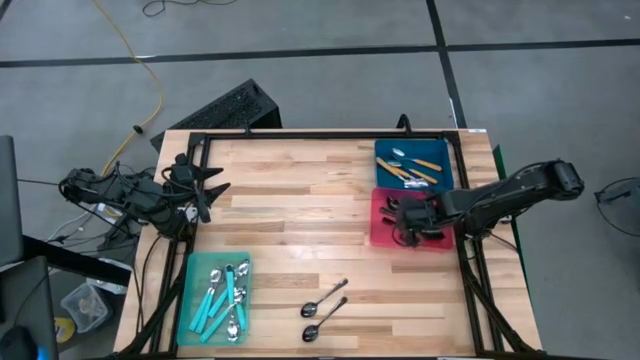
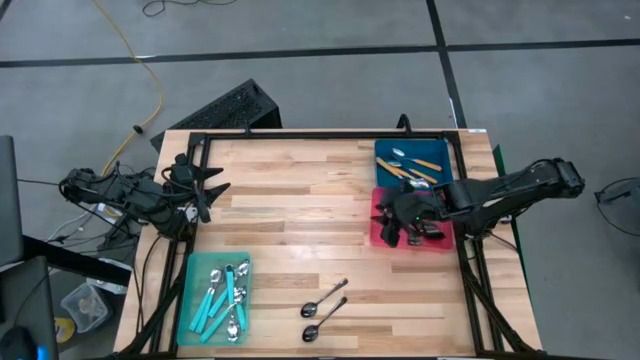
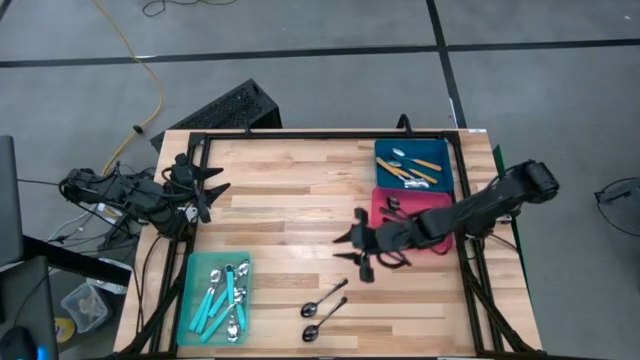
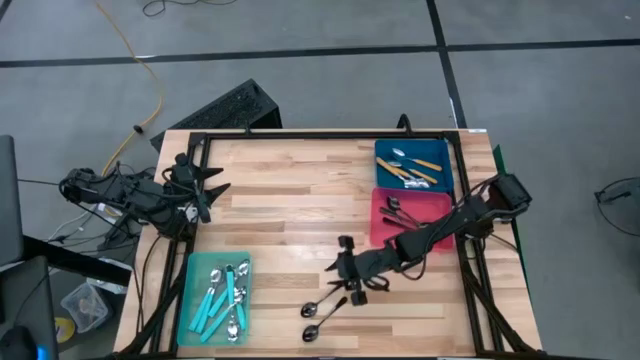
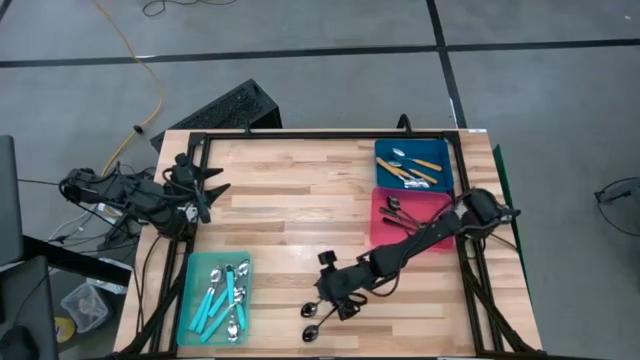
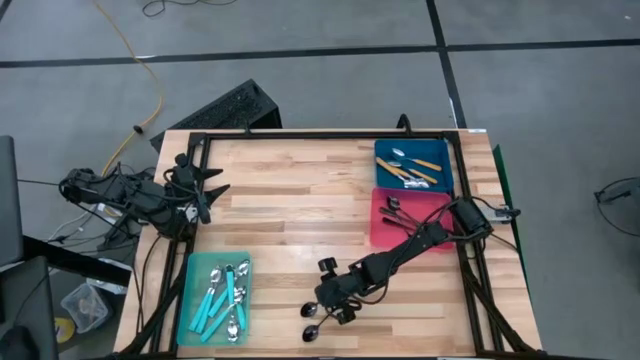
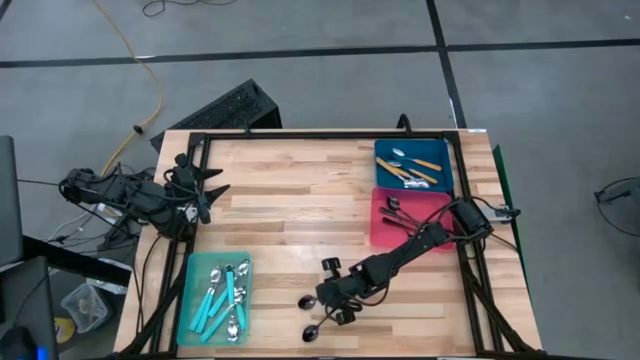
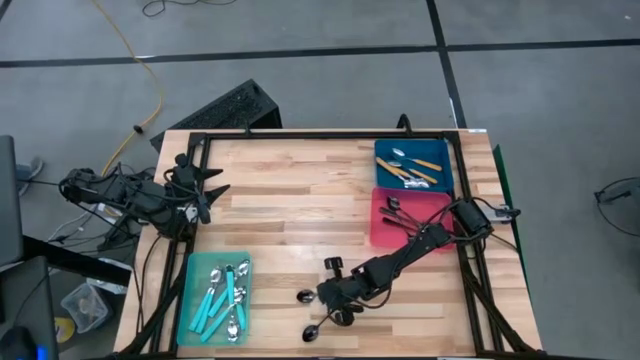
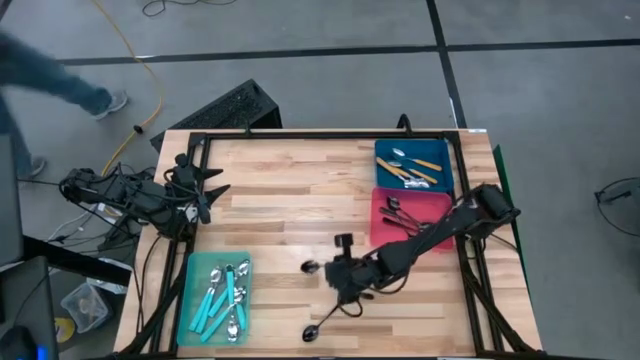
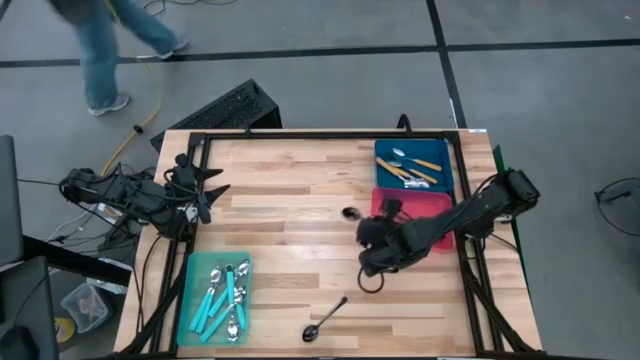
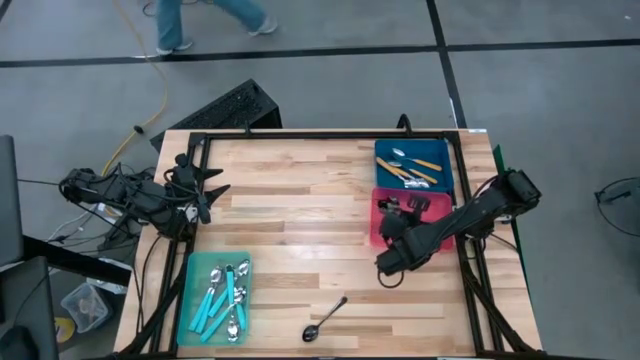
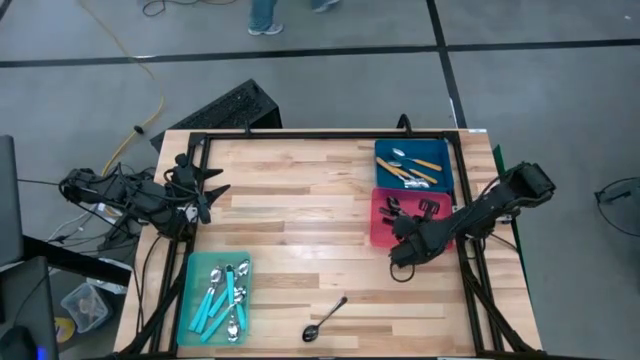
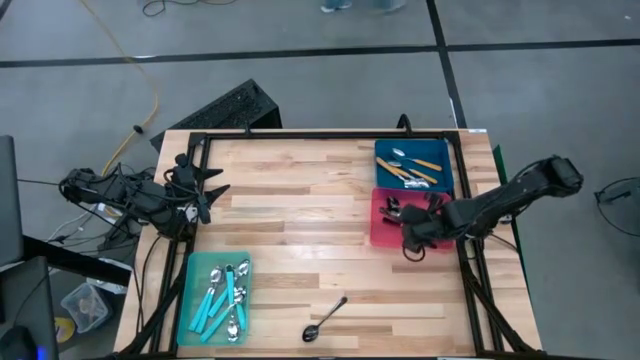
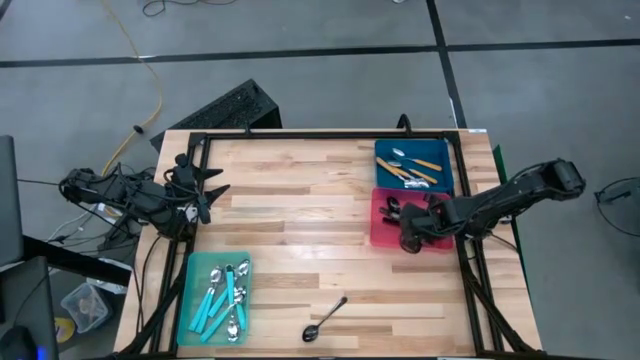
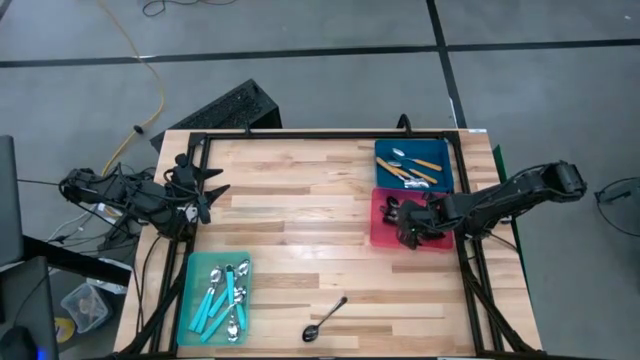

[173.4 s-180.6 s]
Task: Sort silverware by color (type)
Put the black spoon into the red bin

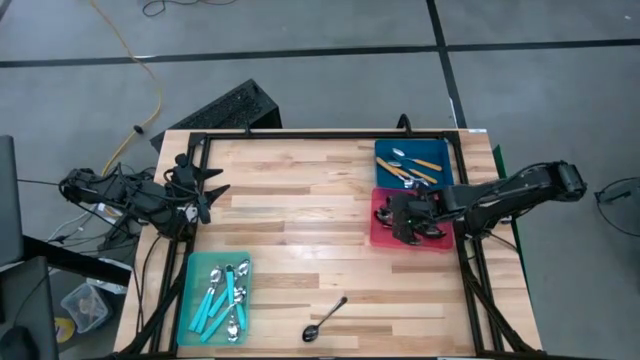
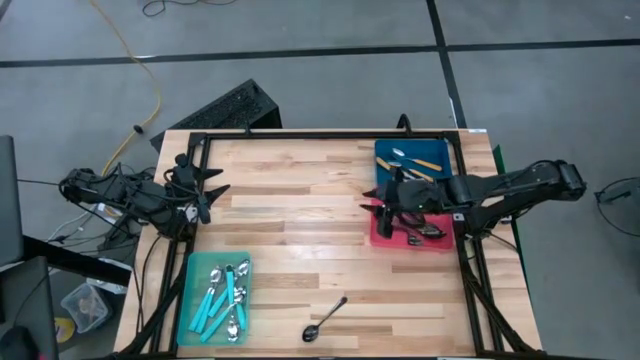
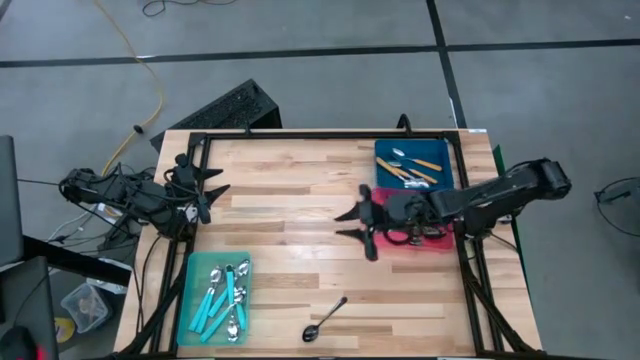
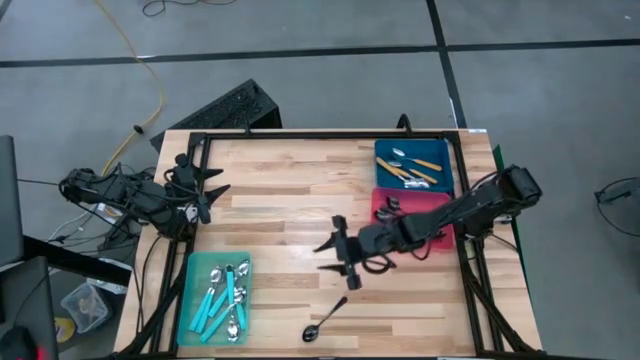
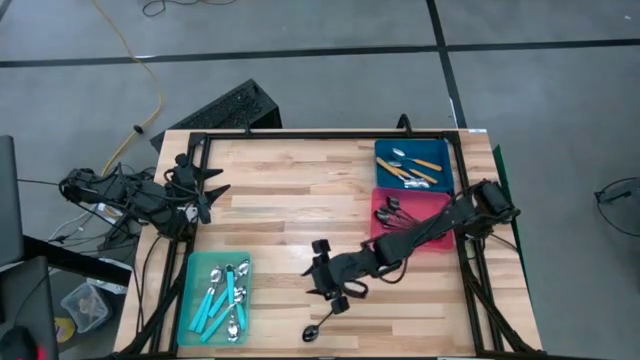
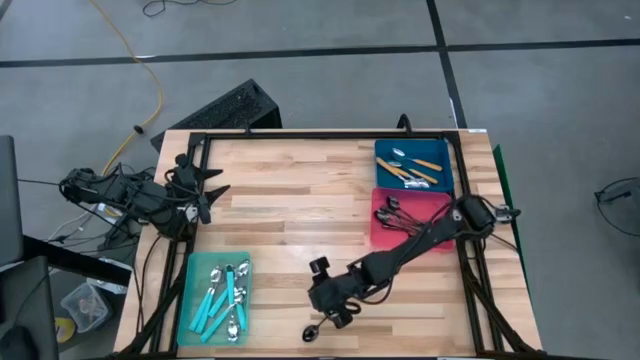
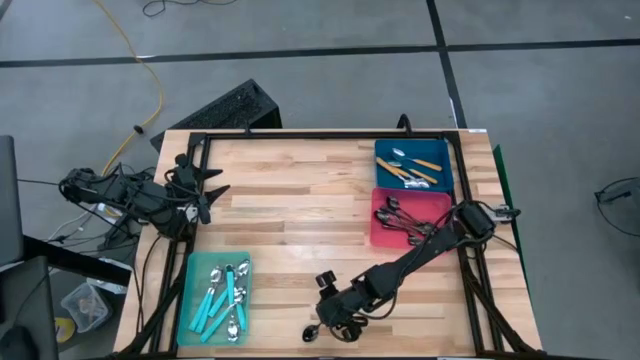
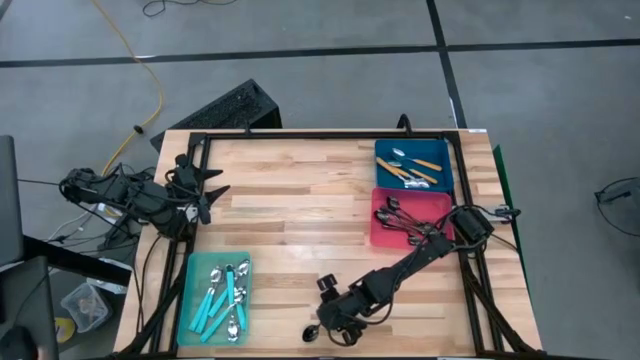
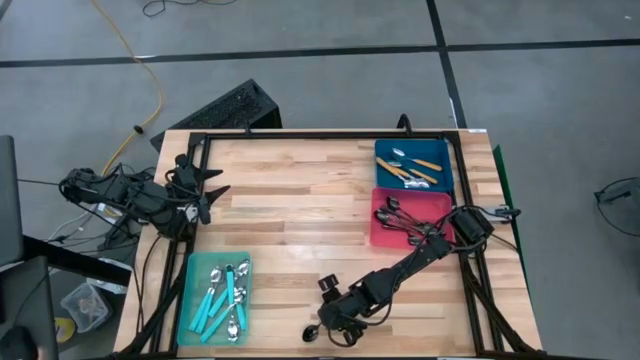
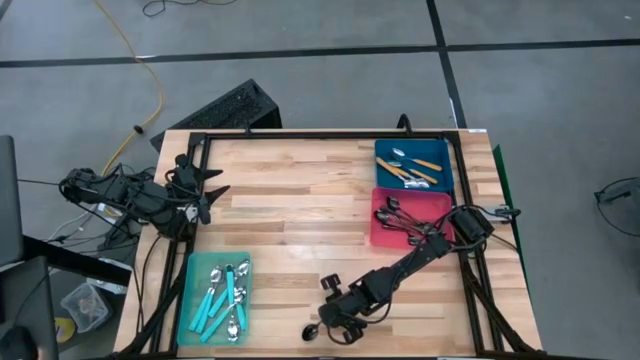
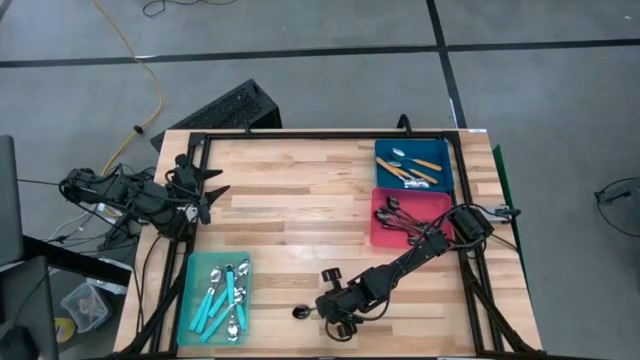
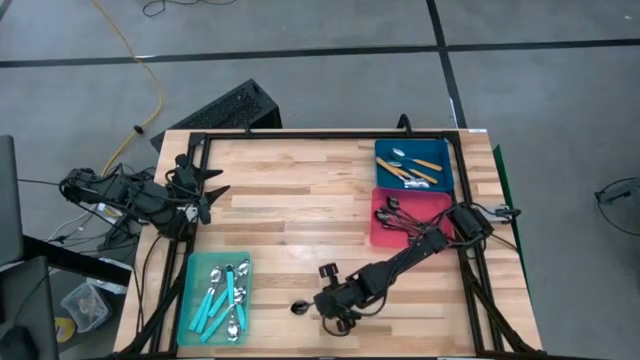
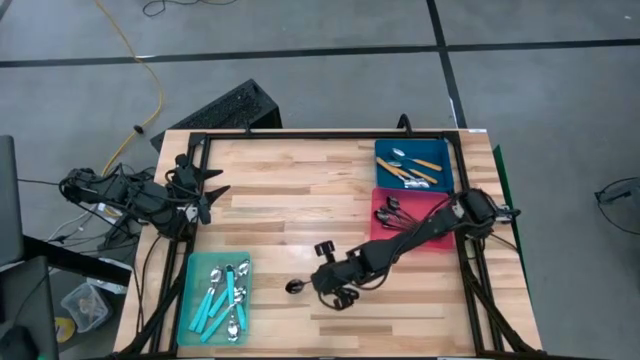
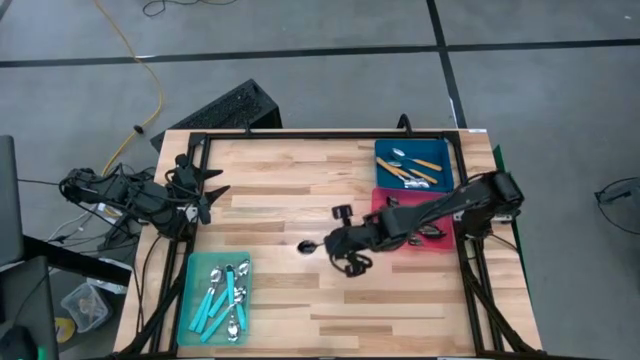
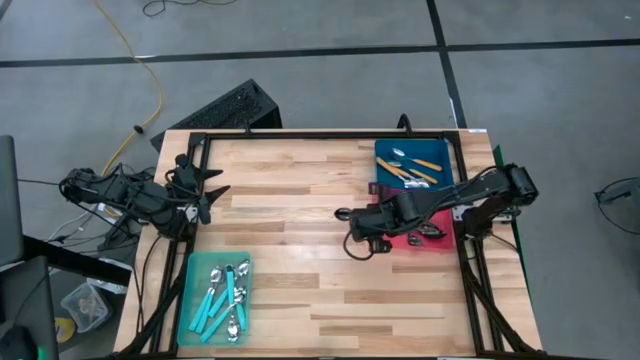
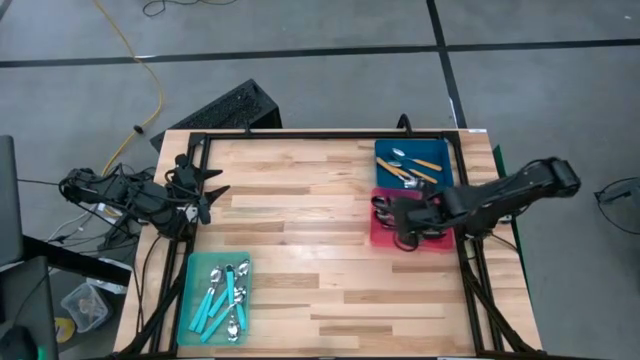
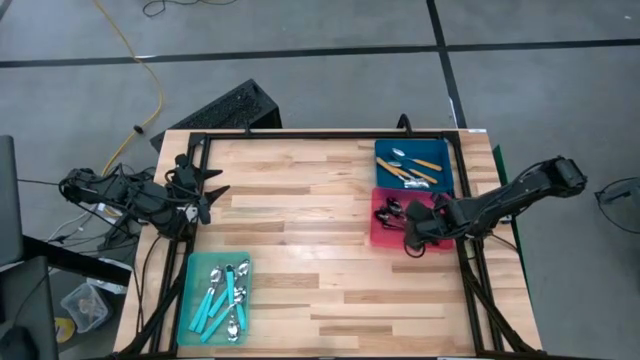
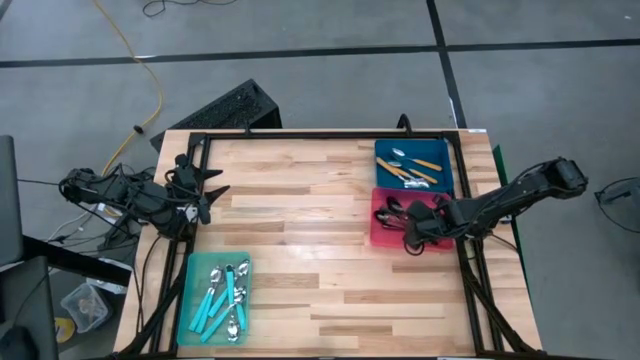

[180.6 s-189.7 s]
Put the black spoon into the red bin

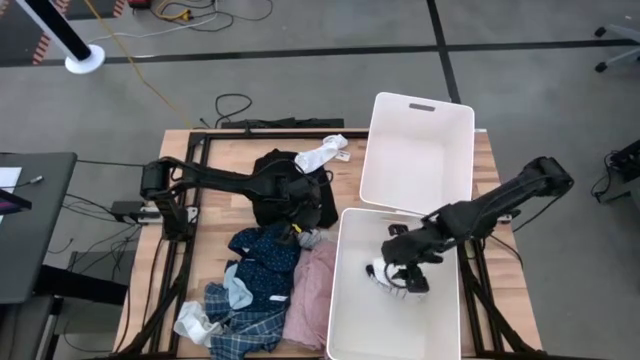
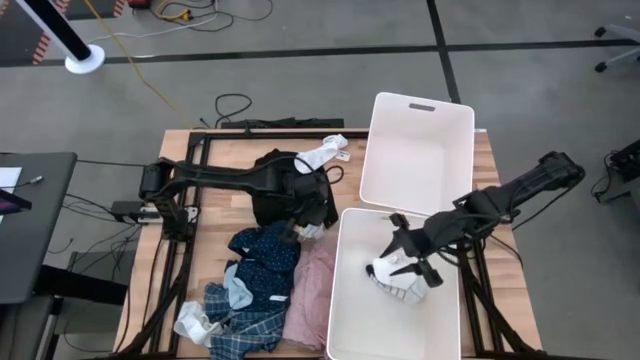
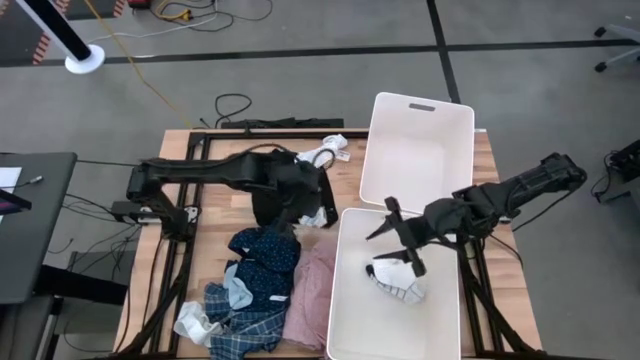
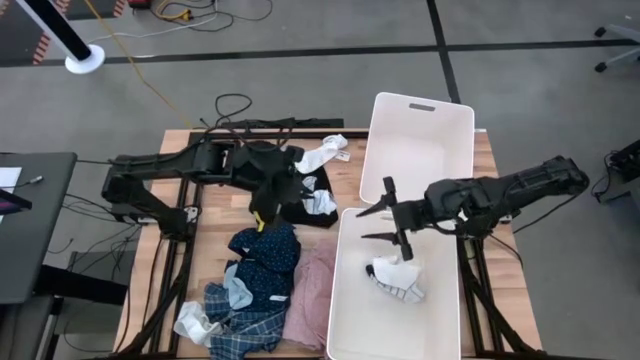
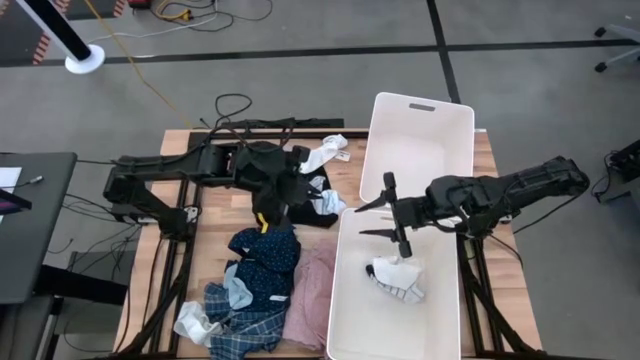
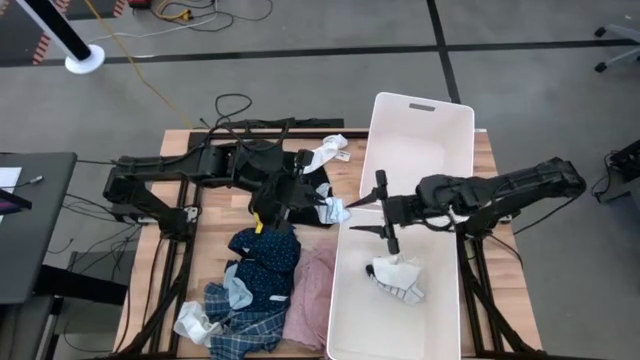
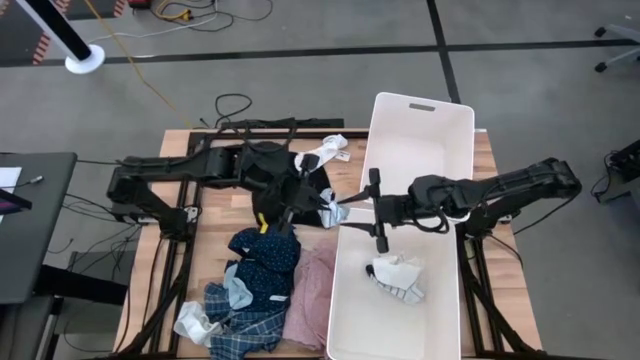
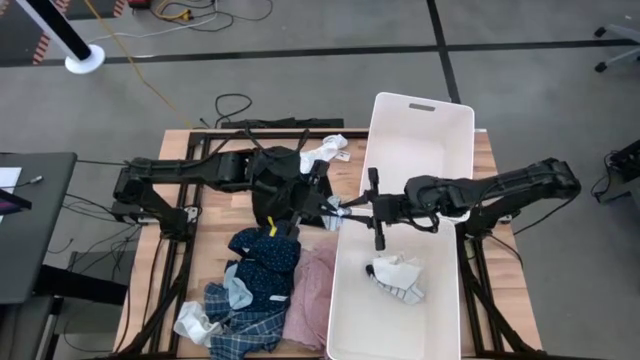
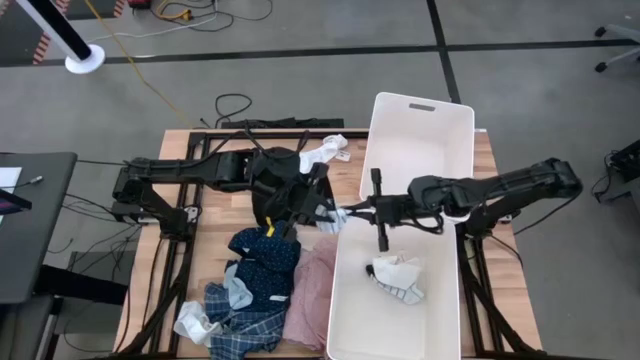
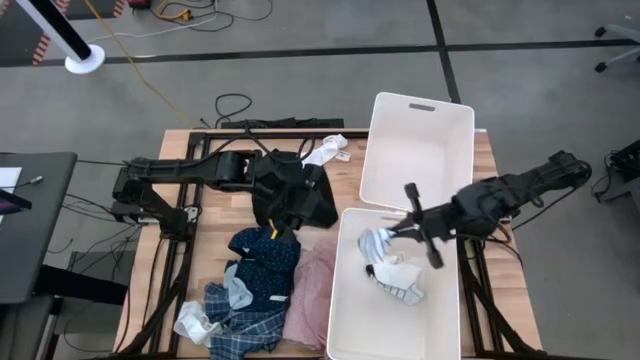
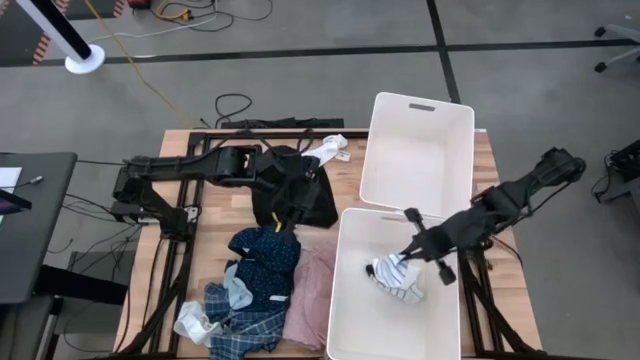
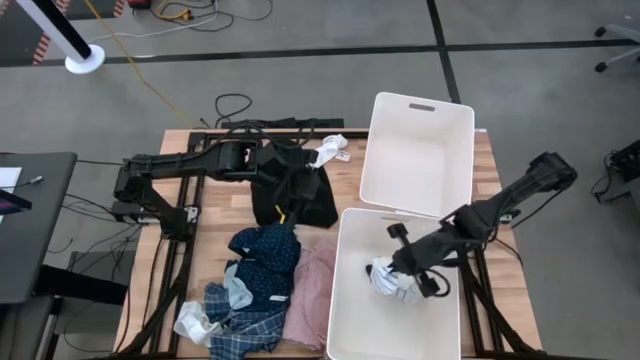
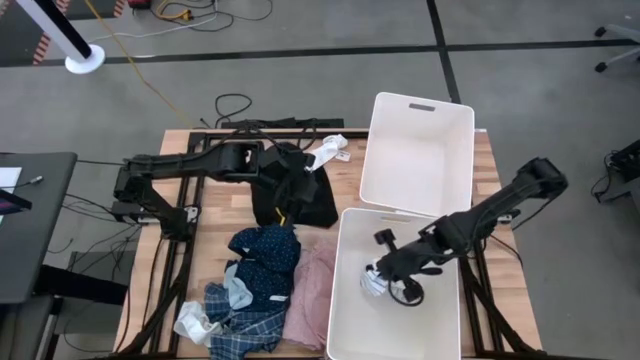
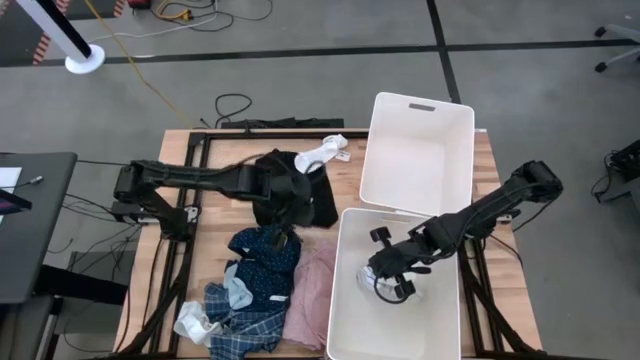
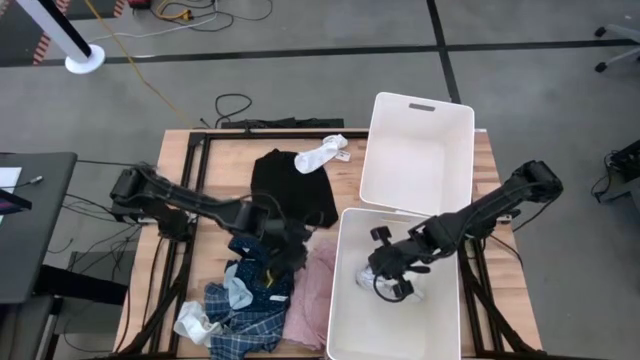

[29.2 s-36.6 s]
Task: Sort clothes
Put the white striped sock into the bottom laundry bin
